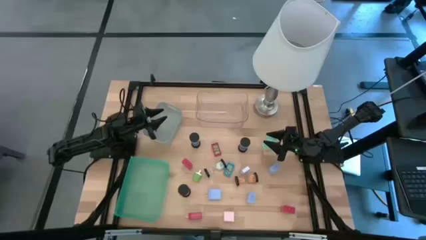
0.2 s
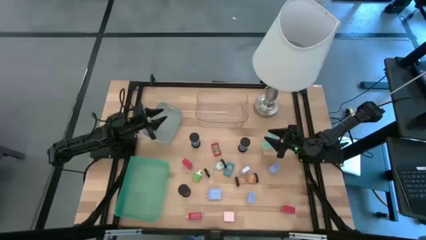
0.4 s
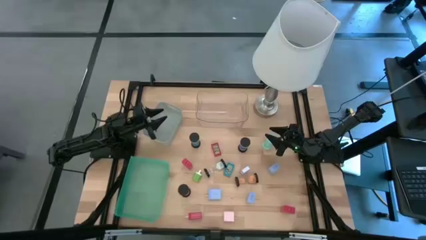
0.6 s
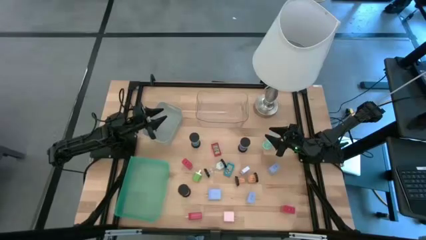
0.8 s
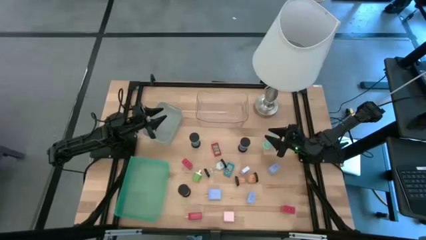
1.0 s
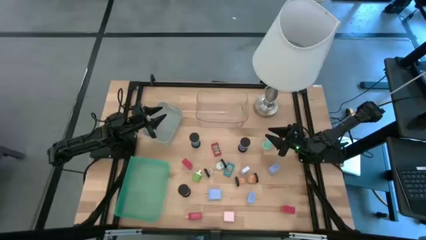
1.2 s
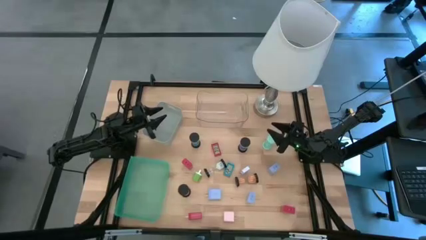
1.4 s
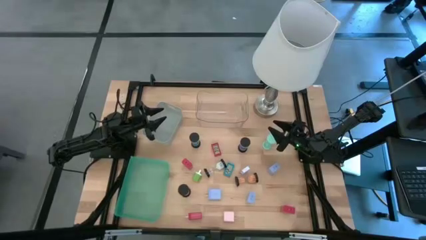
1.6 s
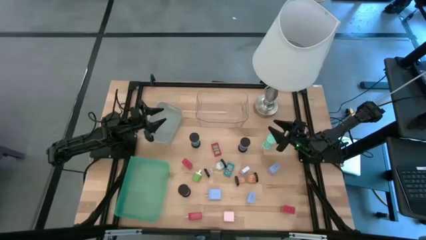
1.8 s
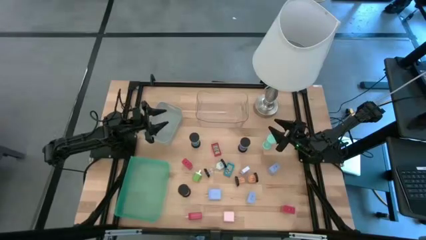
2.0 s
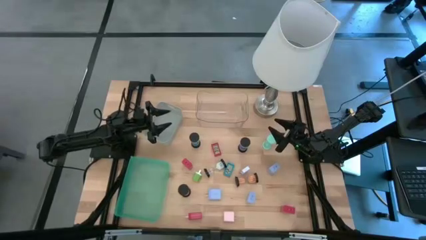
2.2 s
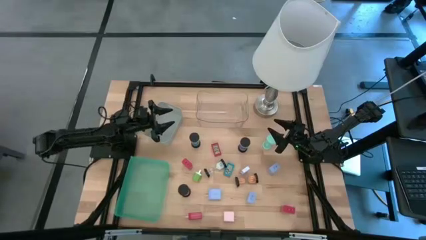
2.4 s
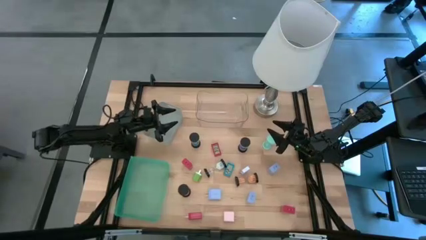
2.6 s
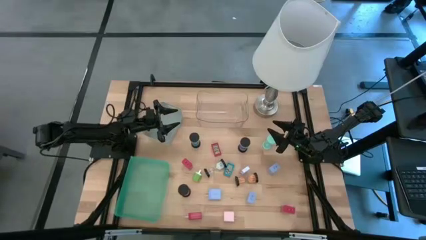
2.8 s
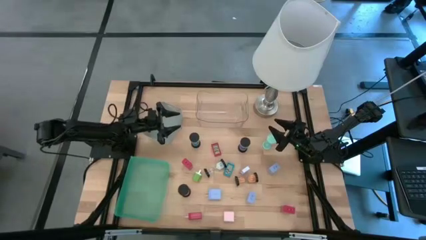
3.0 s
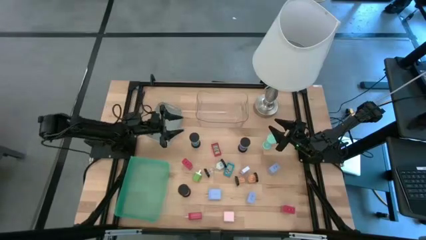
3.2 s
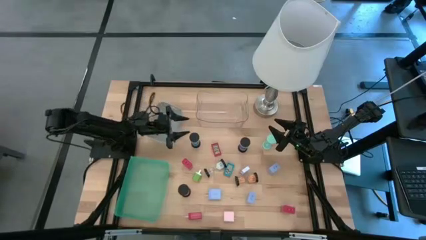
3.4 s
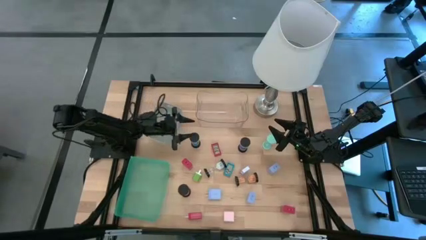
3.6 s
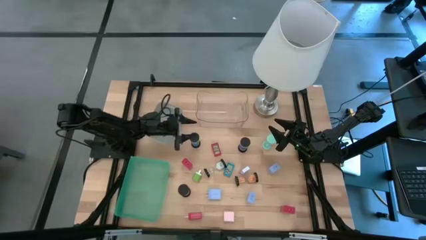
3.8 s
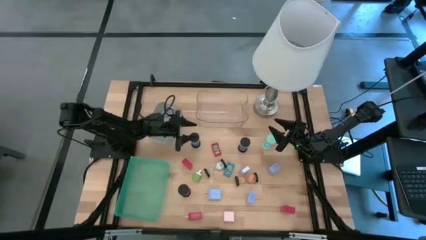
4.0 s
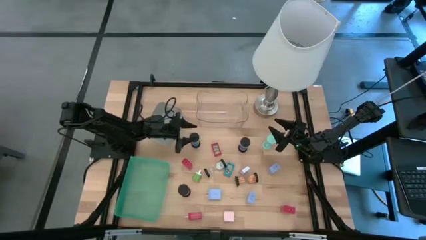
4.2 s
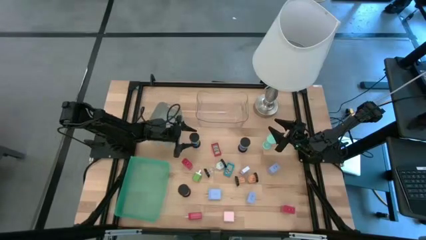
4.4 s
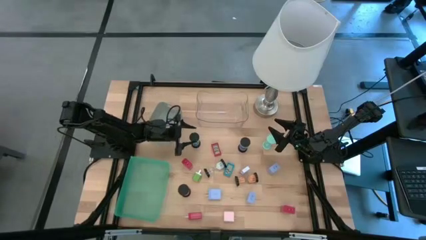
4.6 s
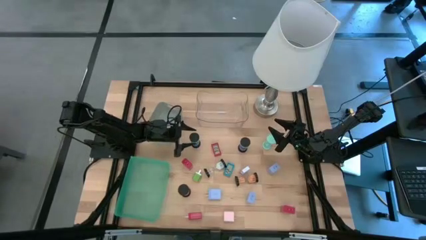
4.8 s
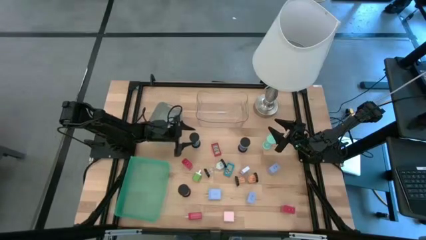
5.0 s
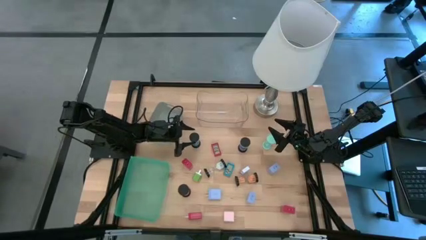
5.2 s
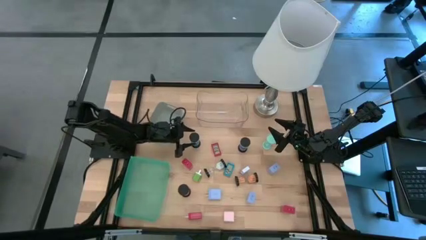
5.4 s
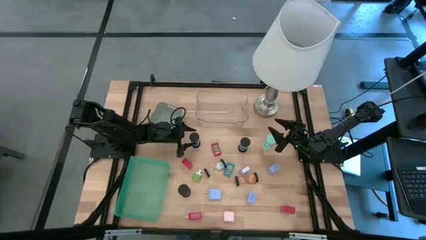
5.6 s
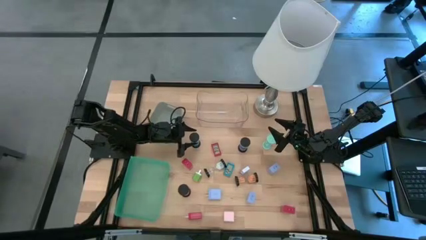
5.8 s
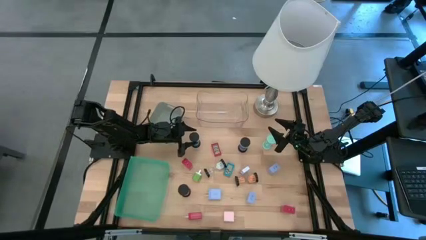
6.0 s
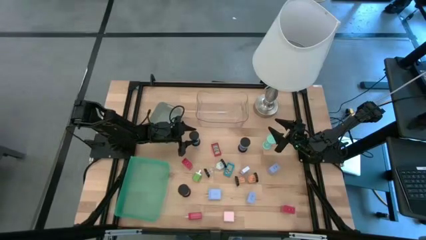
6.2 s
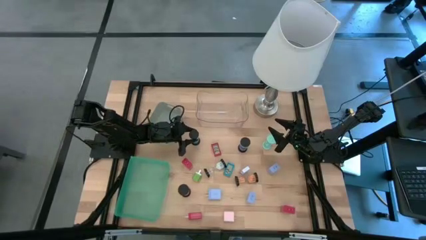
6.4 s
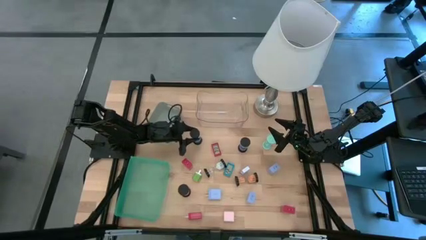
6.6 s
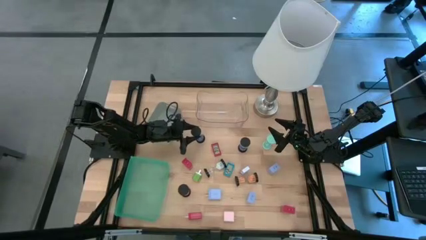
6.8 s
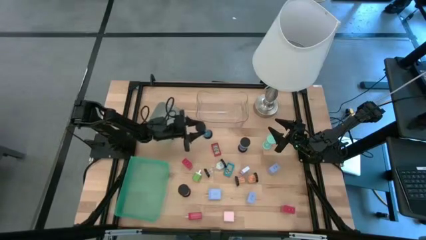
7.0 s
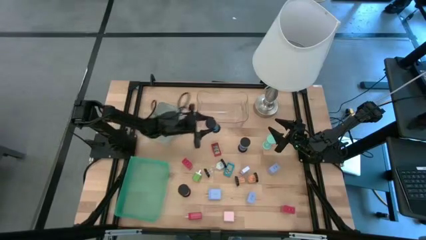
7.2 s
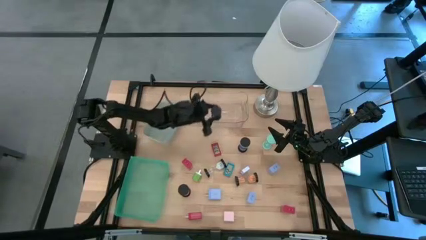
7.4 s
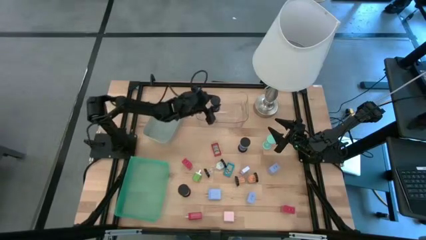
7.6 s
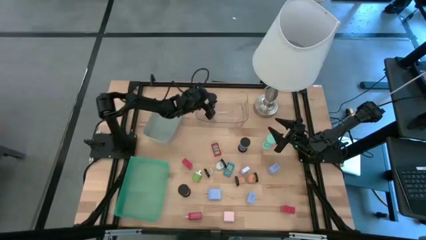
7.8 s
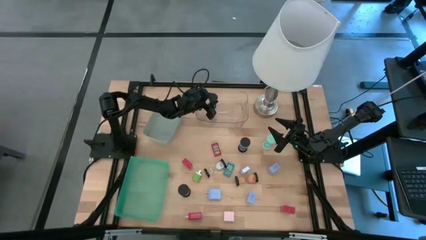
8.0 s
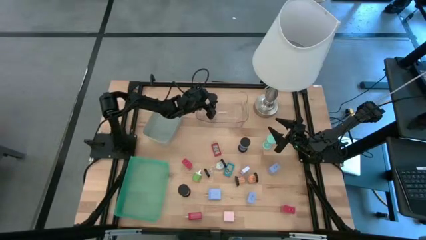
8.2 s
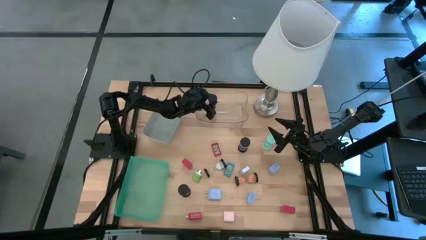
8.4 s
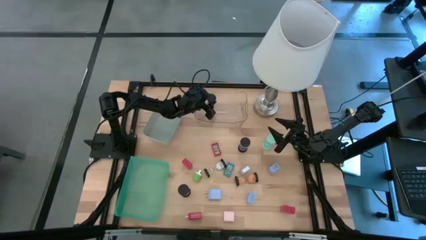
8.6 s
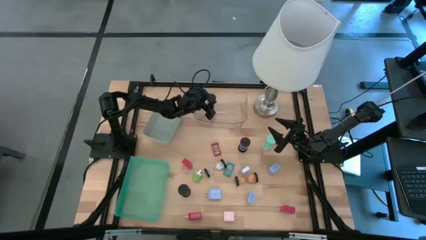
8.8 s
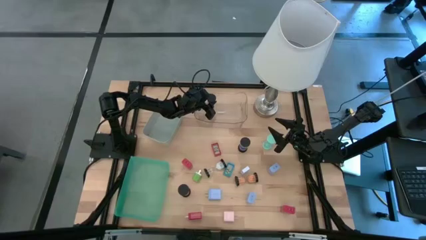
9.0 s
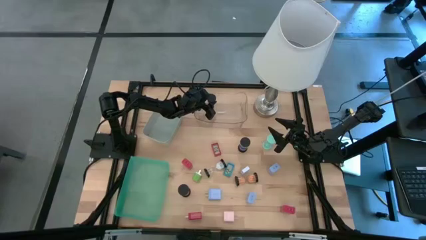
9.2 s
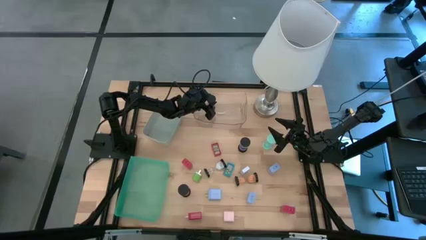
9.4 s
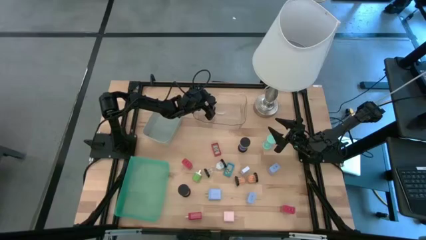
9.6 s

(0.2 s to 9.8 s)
Task: Pick & Place Office items
Put the blue hourglass into the transparent bin

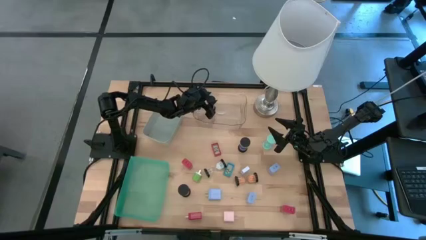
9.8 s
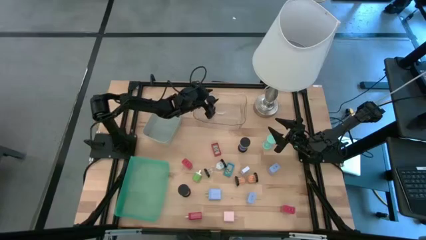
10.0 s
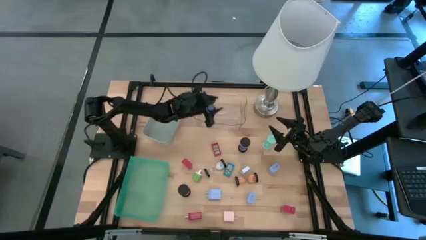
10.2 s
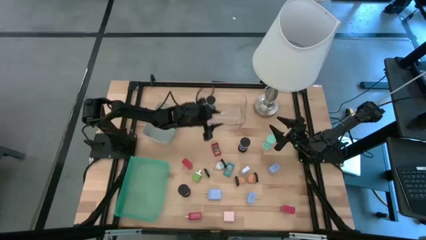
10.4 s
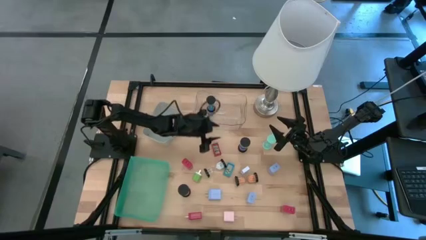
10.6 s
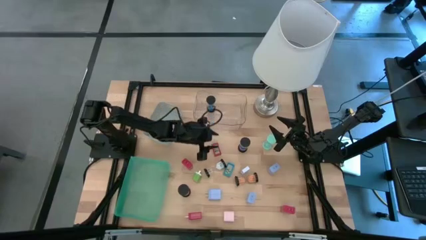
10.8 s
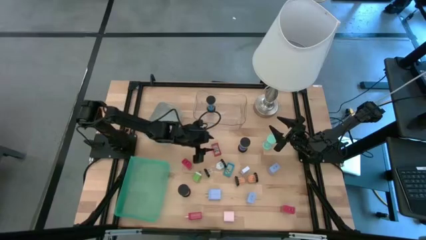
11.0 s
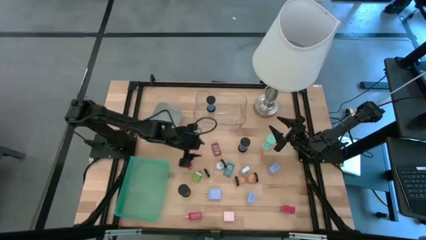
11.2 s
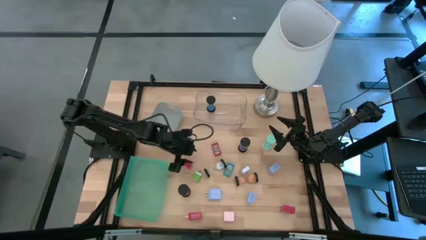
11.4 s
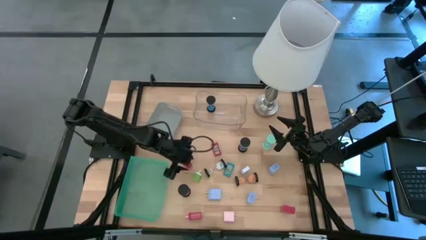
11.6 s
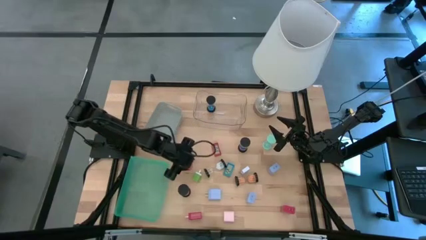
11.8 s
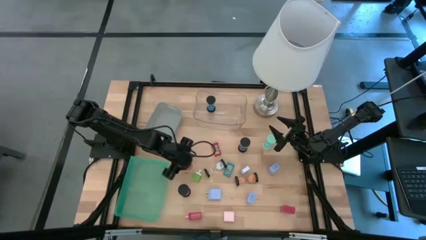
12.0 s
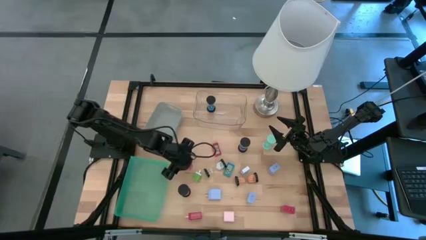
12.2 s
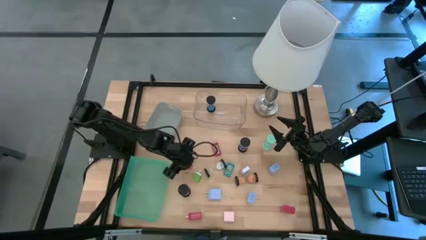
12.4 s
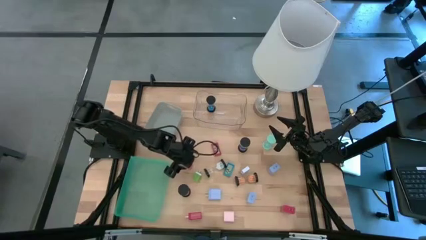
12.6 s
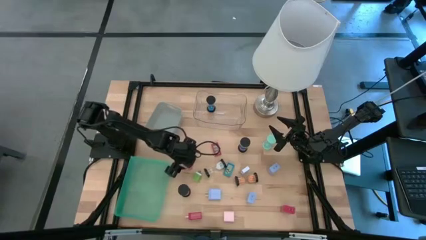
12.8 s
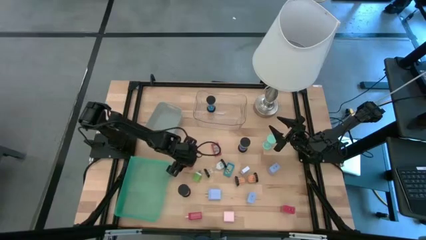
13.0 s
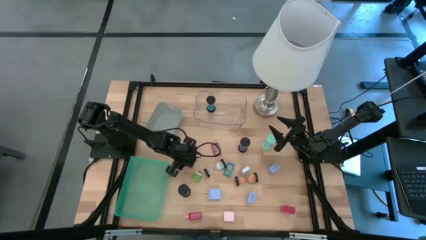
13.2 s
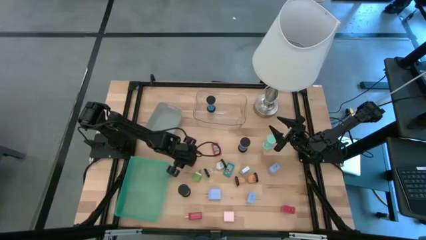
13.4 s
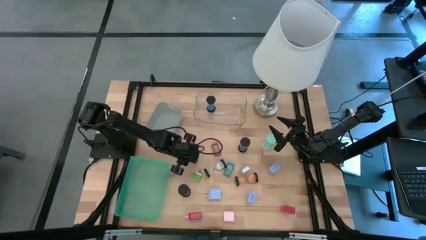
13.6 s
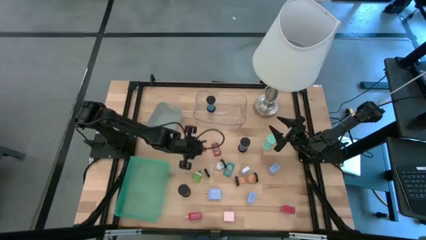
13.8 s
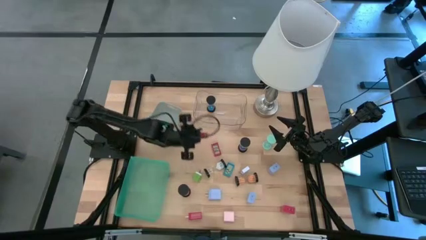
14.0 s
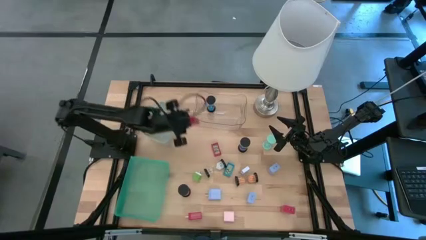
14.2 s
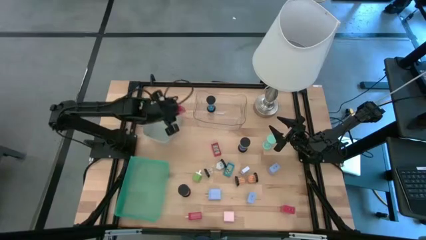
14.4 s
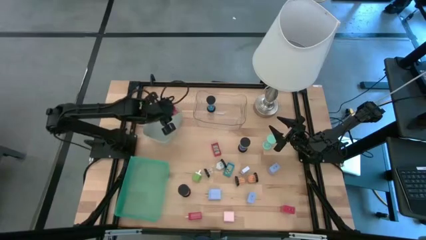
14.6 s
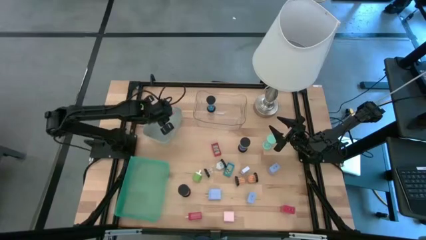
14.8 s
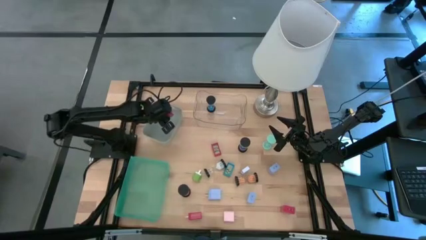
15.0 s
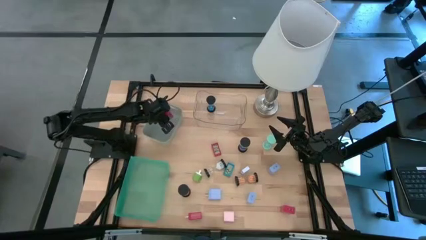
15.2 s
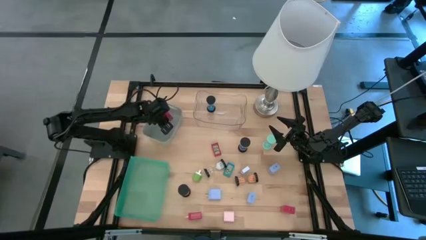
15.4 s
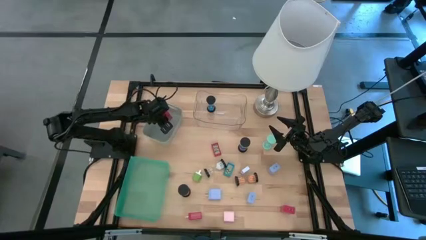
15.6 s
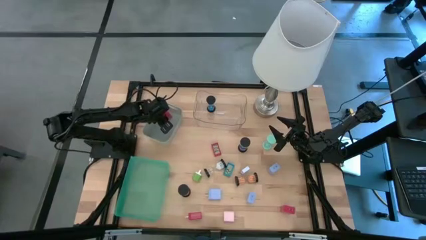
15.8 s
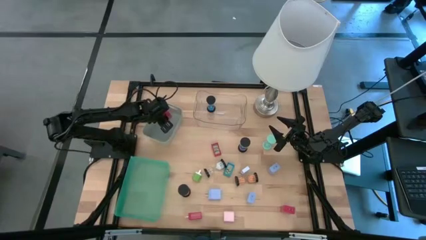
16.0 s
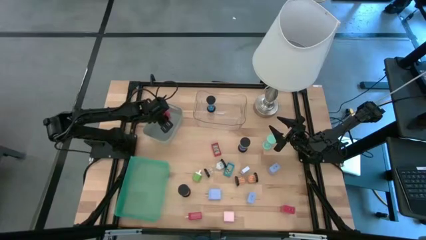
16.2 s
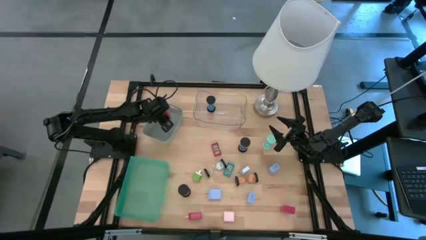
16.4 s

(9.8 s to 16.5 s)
Put the top red charger adapter into the gray bin

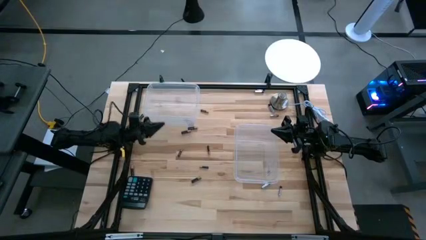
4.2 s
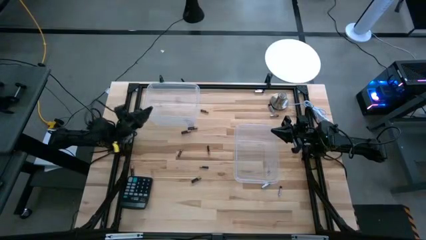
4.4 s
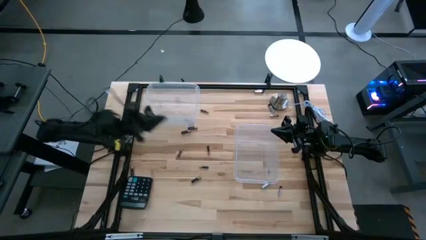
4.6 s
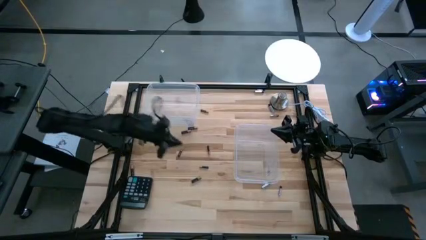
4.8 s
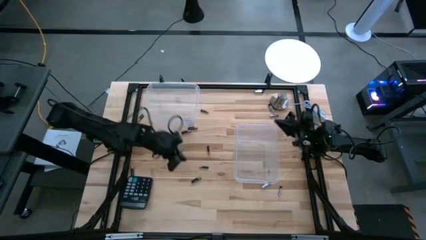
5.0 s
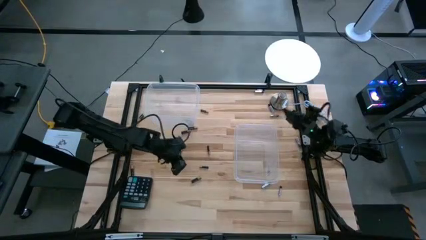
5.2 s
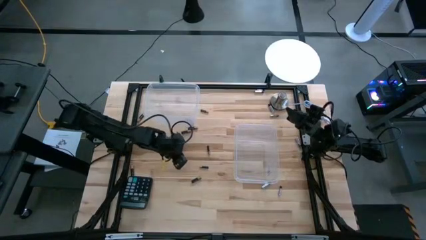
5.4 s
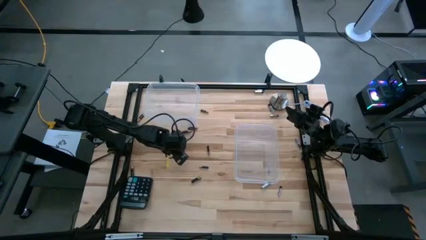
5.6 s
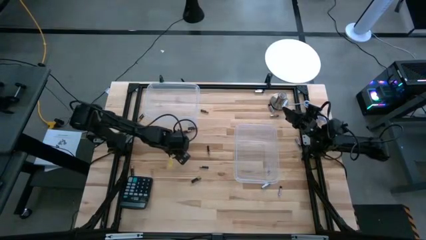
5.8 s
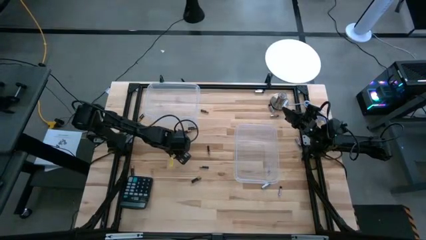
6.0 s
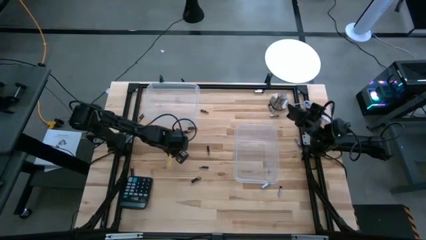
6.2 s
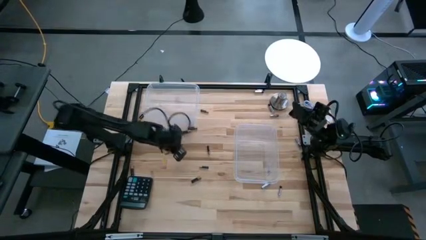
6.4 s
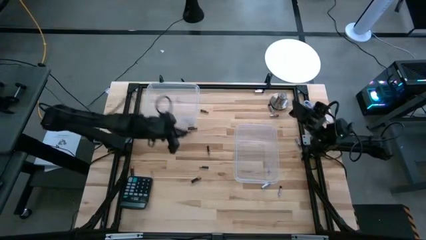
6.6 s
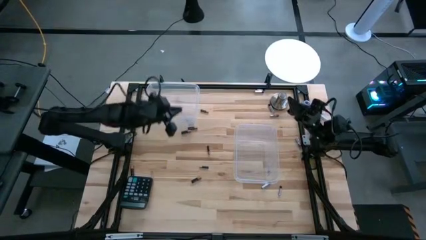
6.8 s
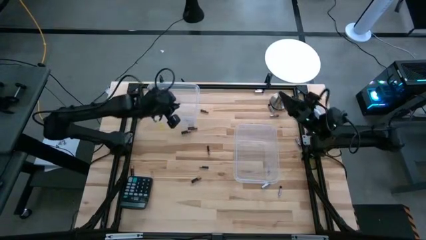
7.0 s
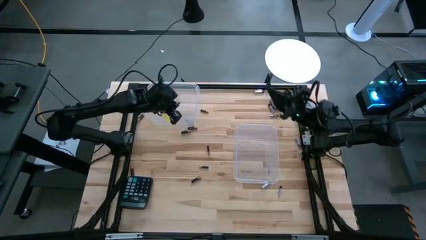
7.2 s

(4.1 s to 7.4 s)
Task: Sort batteries
Put the black battery into the left transparent bin
